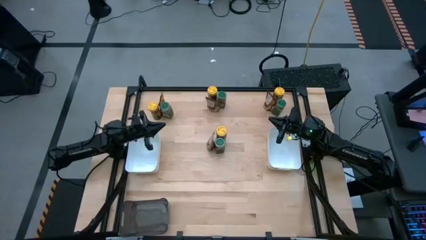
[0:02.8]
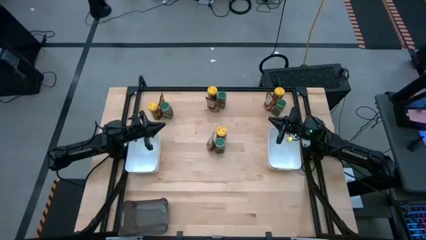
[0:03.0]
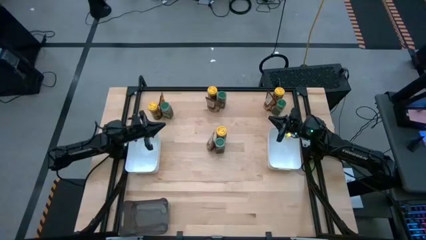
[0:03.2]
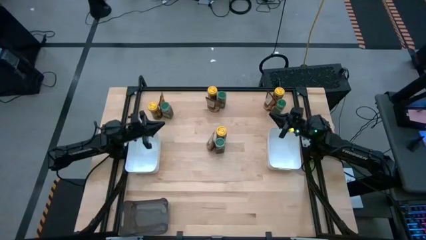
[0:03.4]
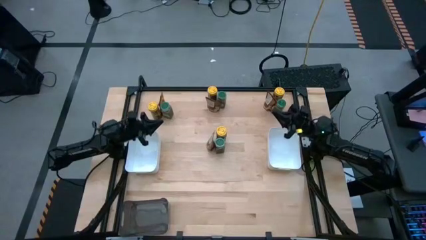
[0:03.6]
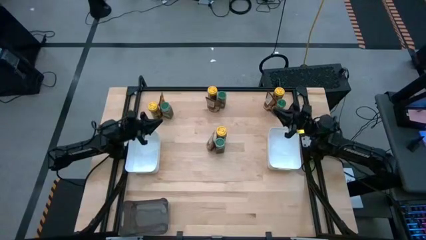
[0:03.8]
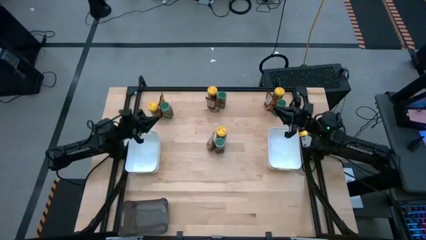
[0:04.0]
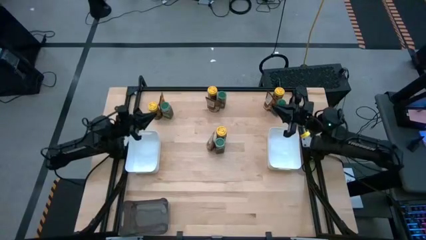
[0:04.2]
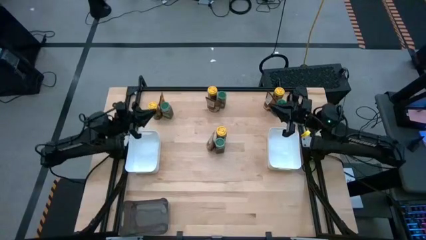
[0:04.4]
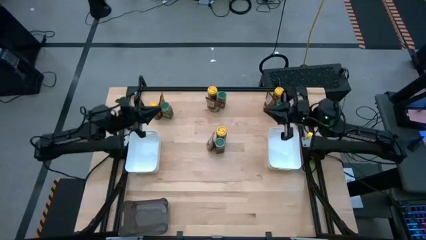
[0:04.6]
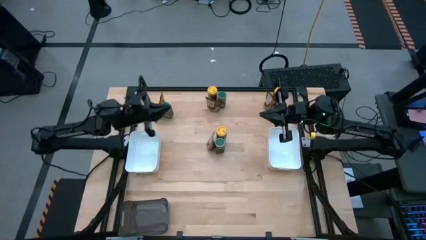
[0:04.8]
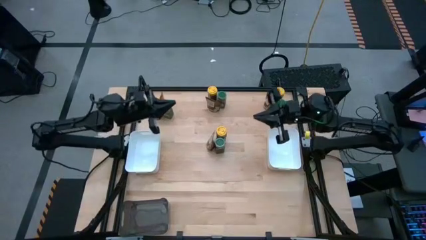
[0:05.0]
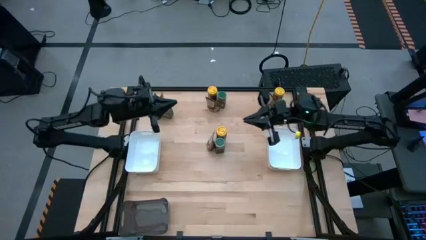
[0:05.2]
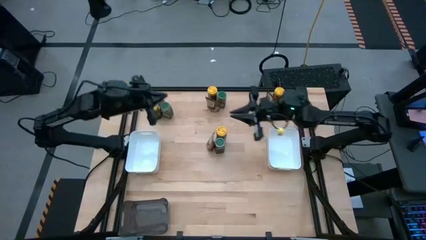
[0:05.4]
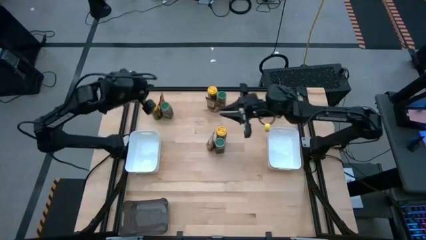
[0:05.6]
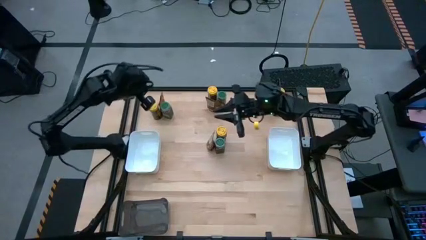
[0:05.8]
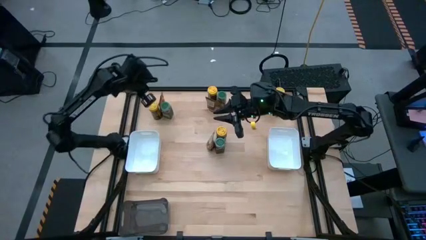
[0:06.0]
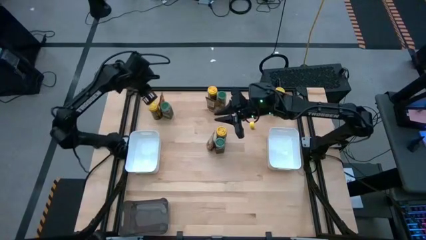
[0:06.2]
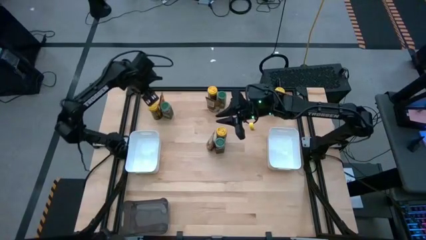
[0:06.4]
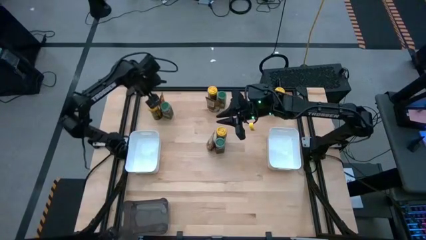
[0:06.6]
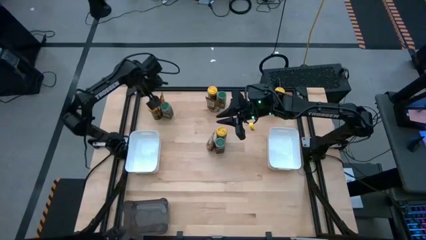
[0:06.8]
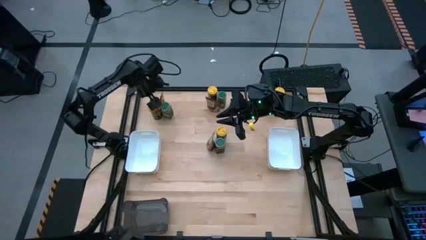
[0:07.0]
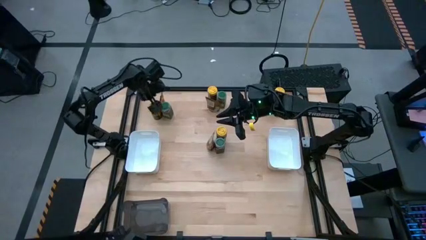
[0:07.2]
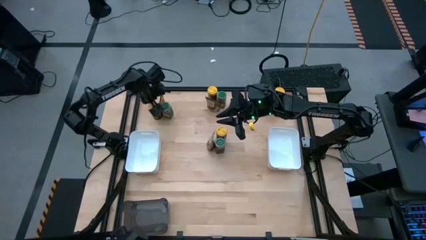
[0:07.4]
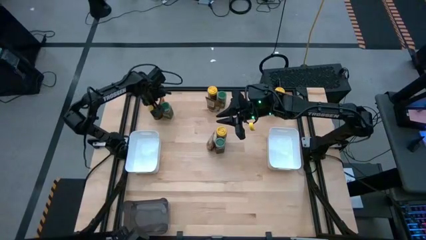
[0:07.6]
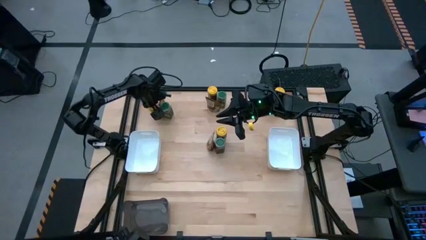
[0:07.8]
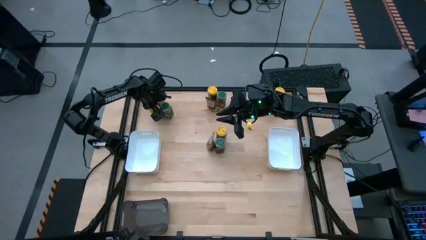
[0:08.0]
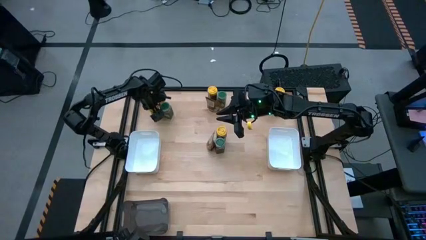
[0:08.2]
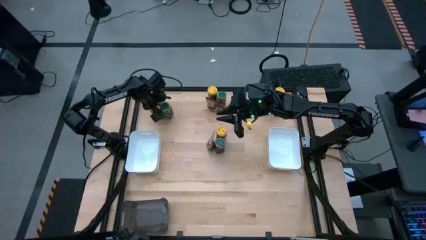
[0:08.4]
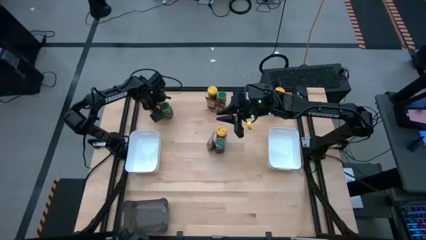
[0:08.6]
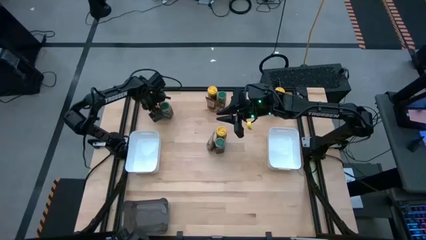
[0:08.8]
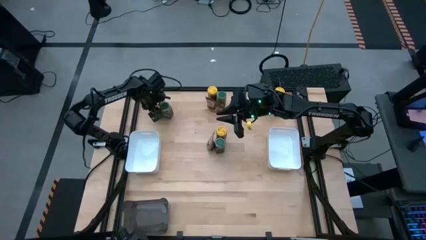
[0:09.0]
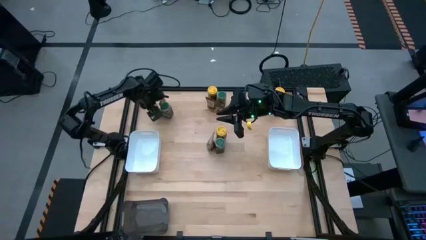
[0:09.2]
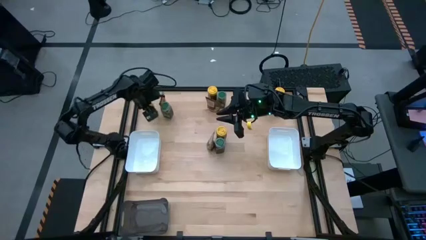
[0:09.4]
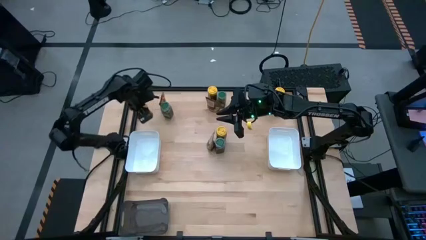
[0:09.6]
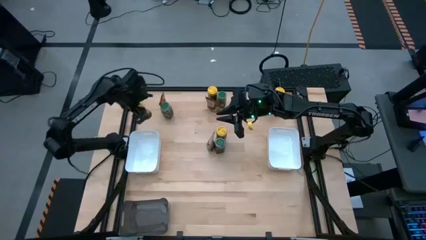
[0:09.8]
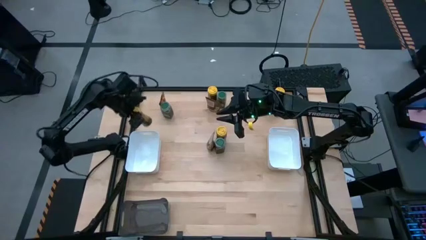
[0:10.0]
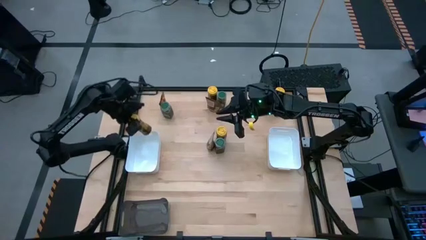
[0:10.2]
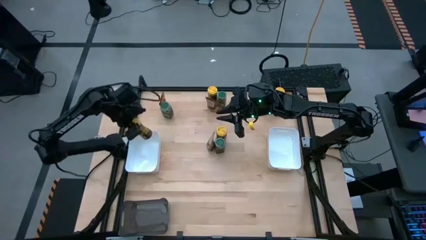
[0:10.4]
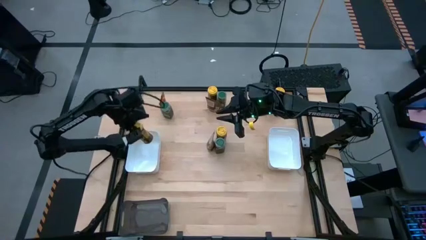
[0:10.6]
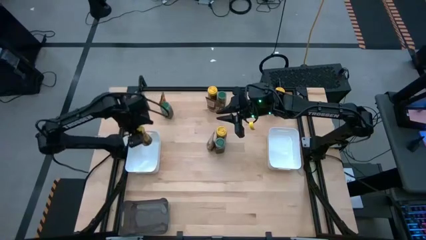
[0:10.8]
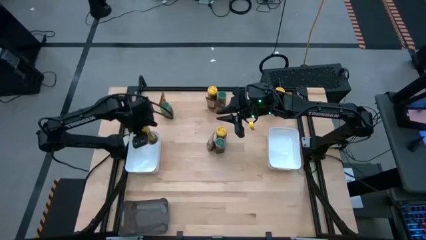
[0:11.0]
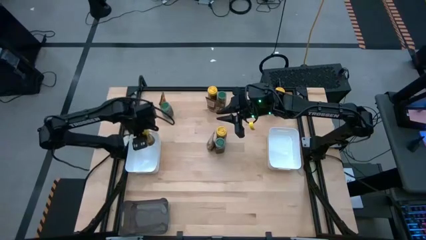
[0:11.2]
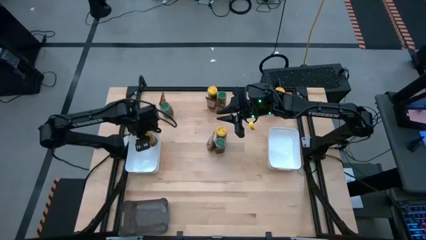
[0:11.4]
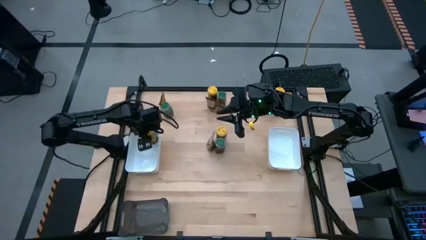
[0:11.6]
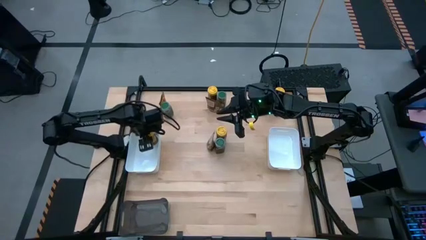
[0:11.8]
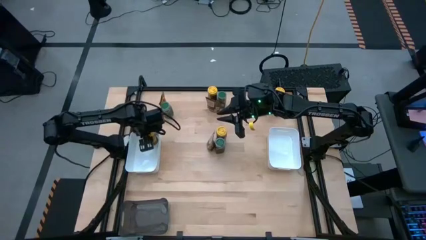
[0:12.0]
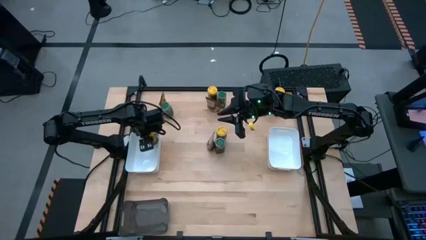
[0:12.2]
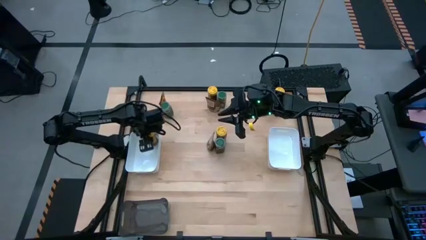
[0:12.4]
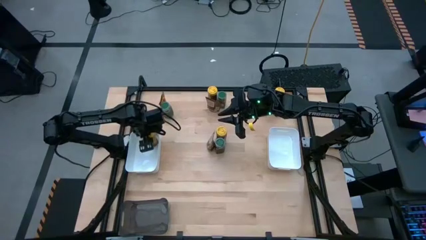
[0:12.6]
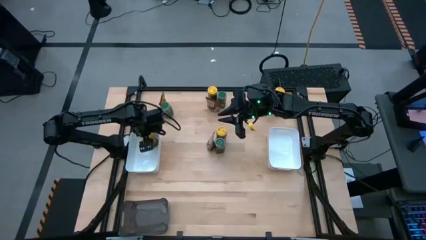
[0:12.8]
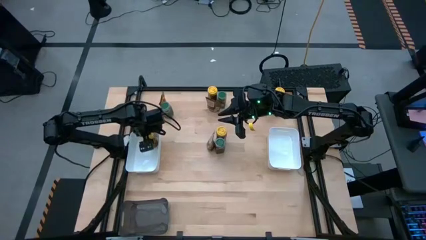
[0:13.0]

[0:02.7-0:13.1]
Task: Sort spices by type
Put the top left yellow seasoning bottle into the left white bin
